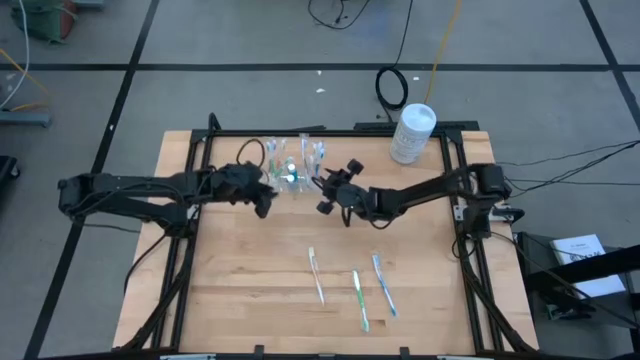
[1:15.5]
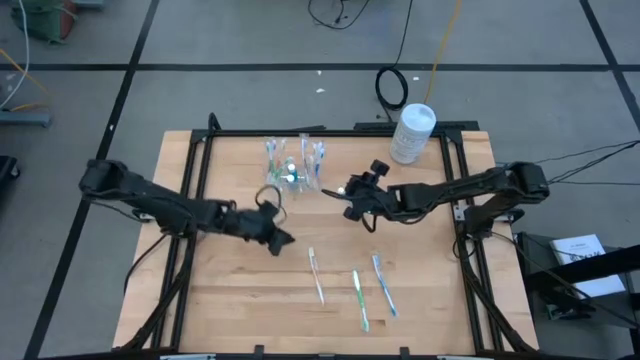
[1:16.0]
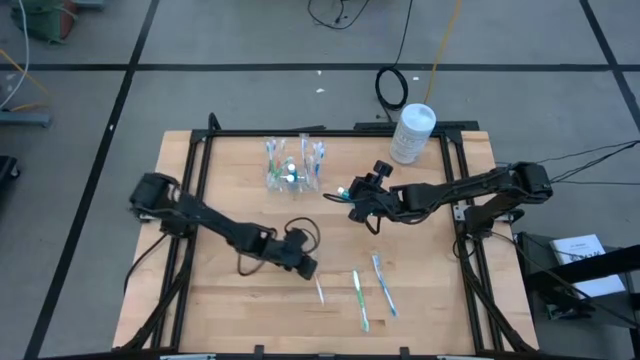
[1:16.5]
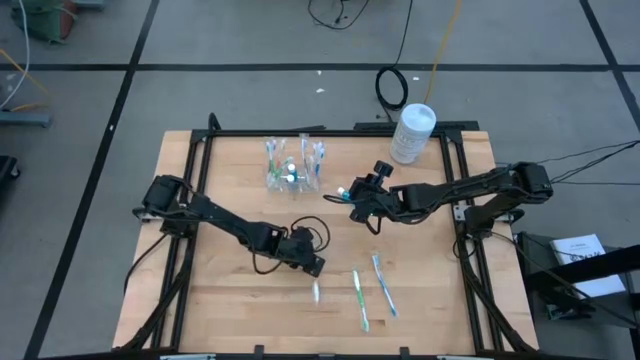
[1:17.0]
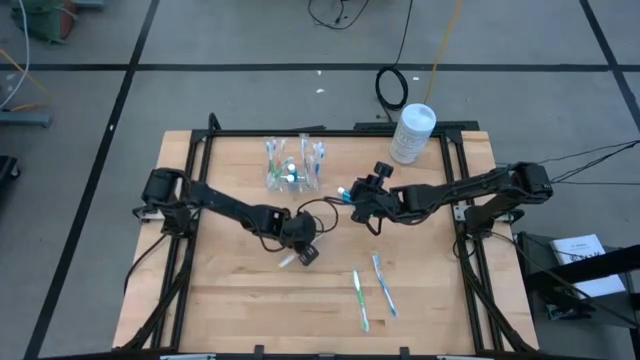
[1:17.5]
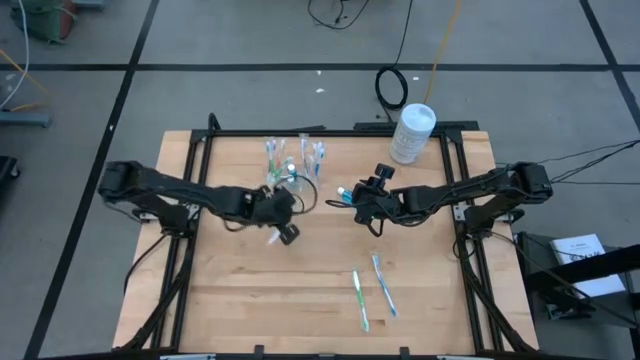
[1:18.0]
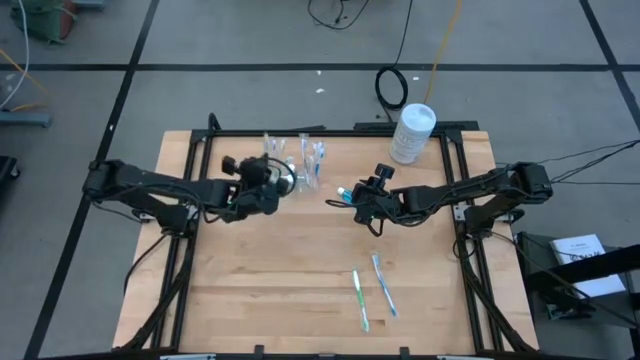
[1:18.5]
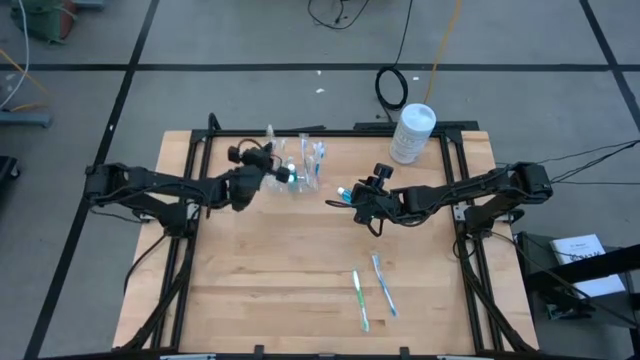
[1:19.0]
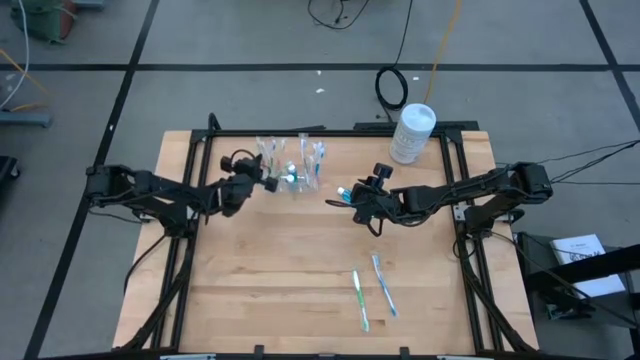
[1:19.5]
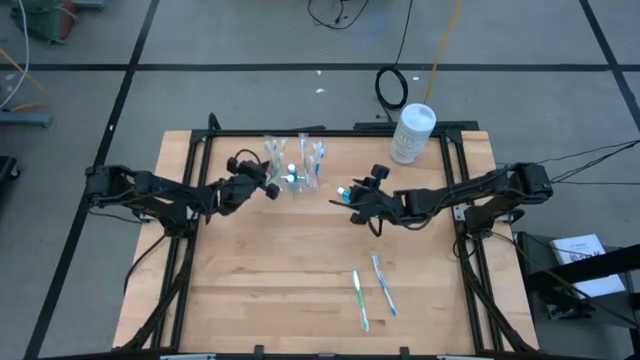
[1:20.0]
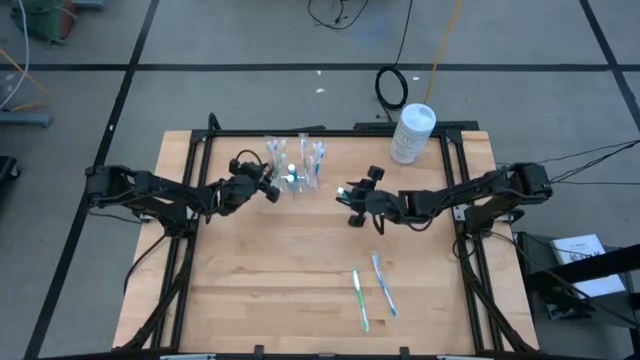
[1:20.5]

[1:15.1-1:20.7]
Task: Pick & Place toothbrushing station
Put the orange toothbrush into the transparent organizer

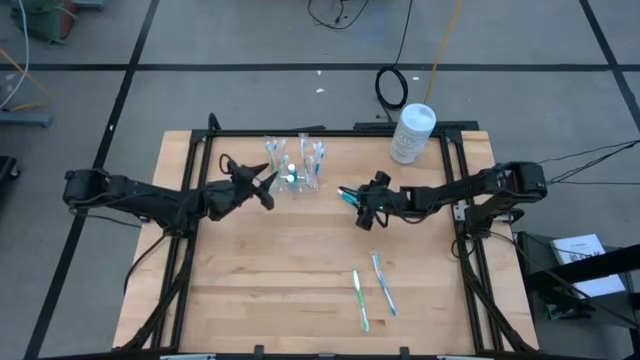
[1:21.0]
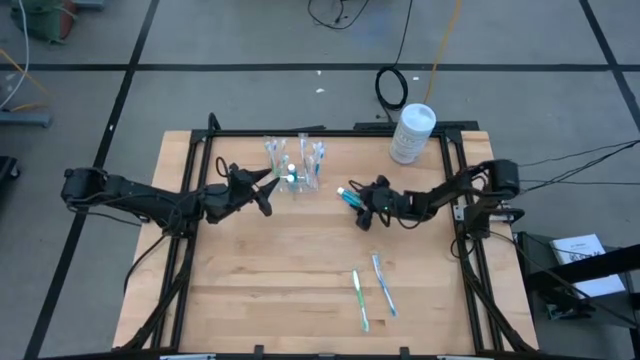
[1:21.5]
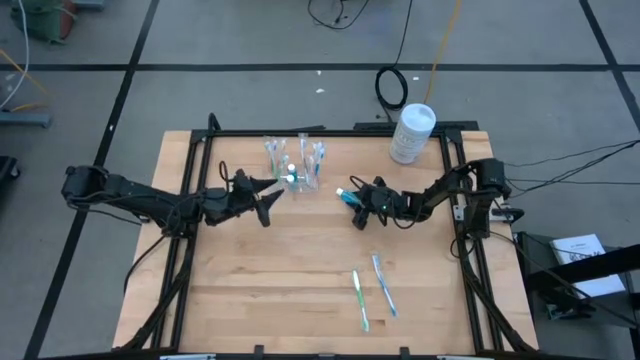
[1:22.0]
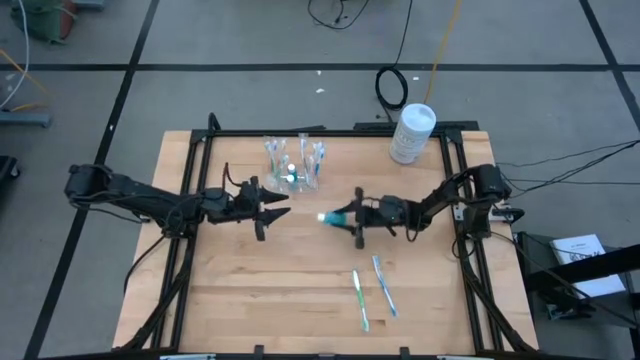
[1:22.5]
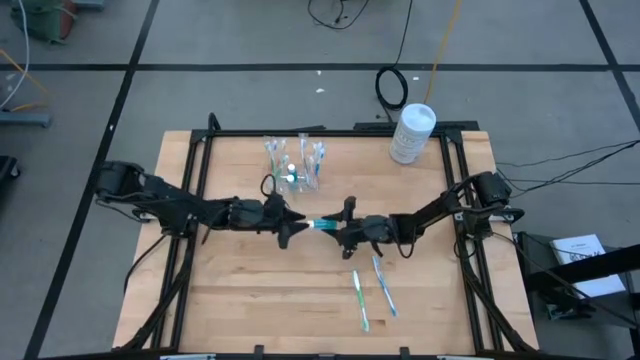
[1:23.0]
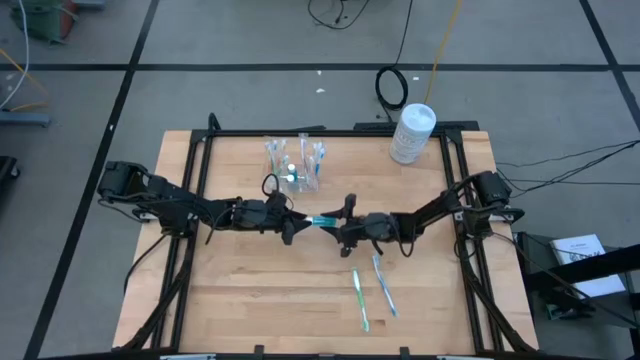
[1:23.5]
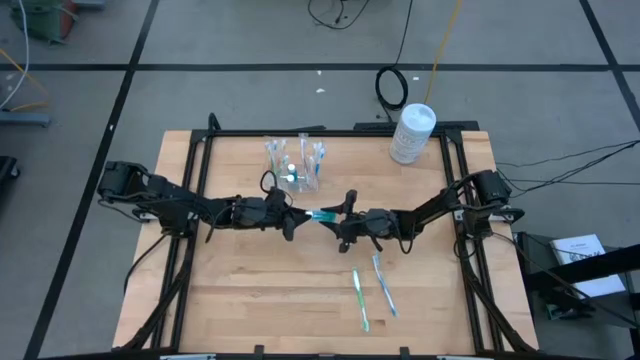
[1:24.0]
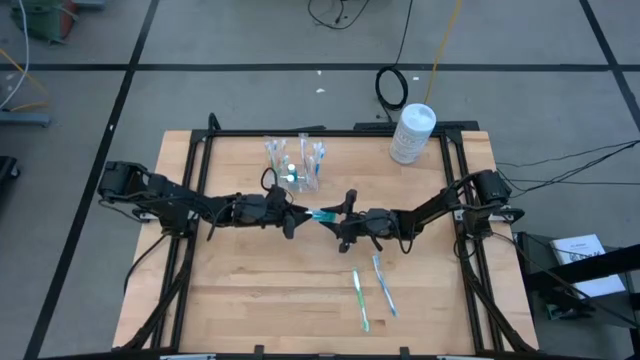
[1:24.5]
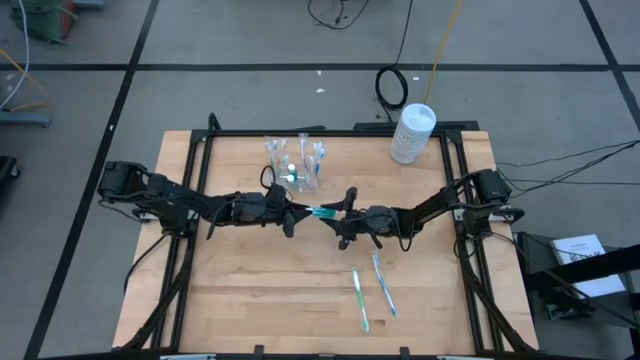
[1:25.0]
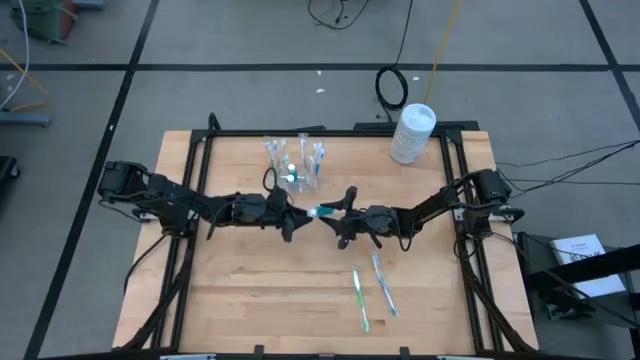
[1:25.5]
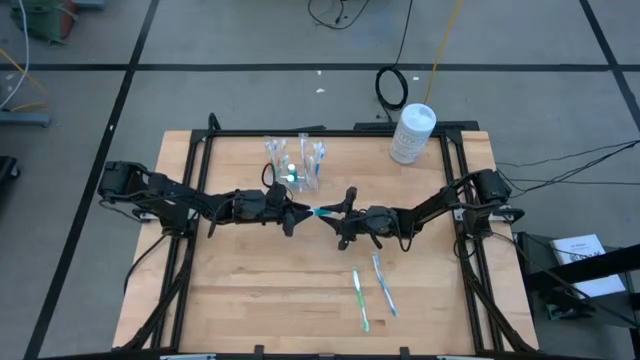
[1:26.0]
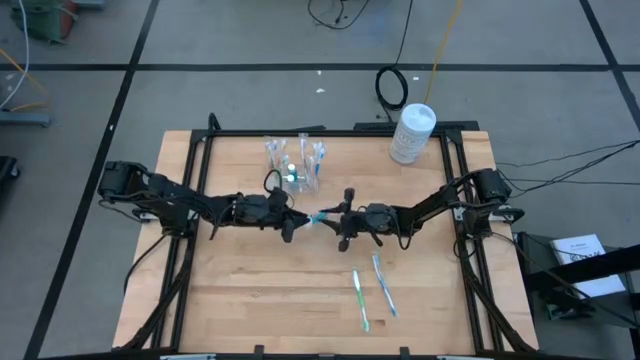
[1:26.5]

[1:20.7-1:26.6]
Put the blue mouthwash into the transparent organizer

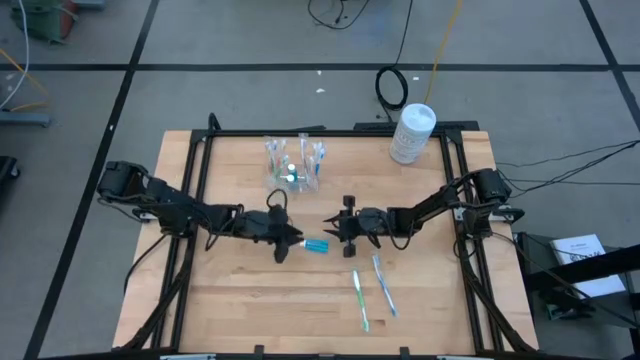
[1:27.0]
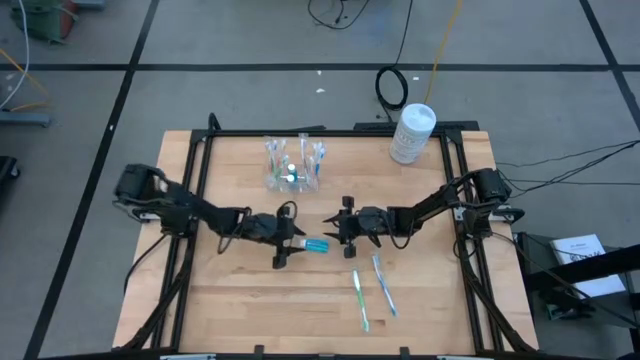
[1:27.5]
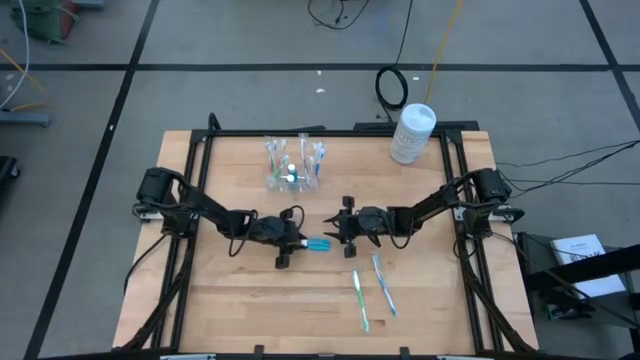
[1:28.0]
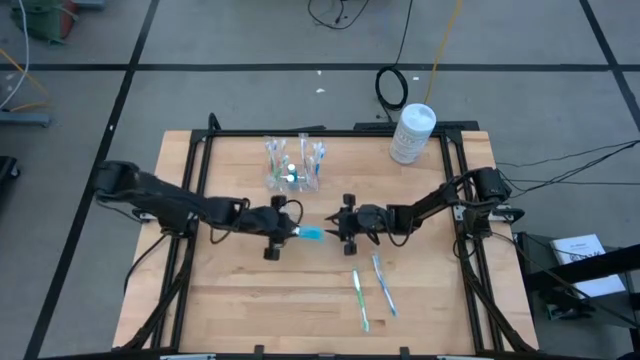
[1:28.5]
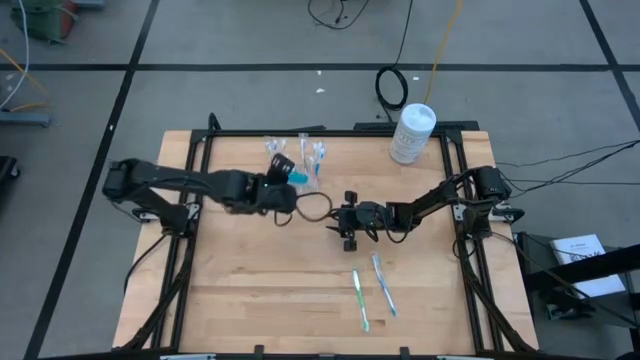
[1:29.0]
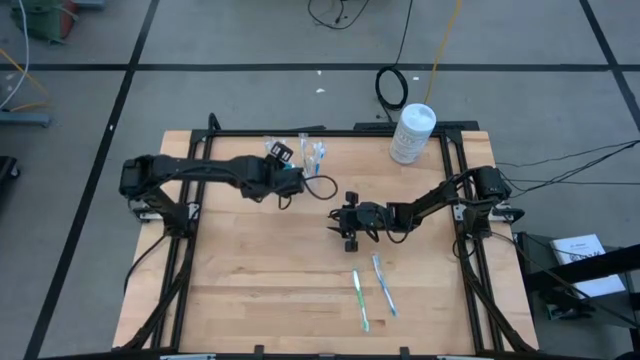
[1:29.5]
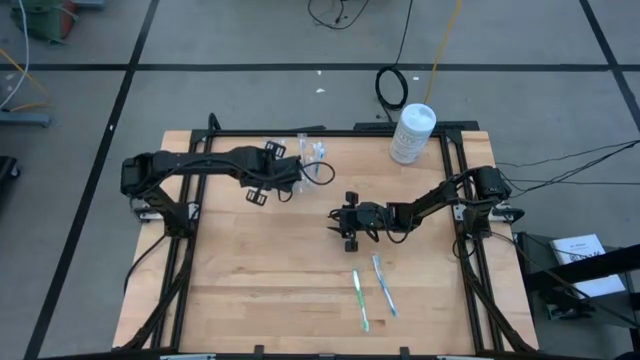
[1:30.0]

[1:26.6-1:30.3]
Put the blue mouthwash into the transparent organizer

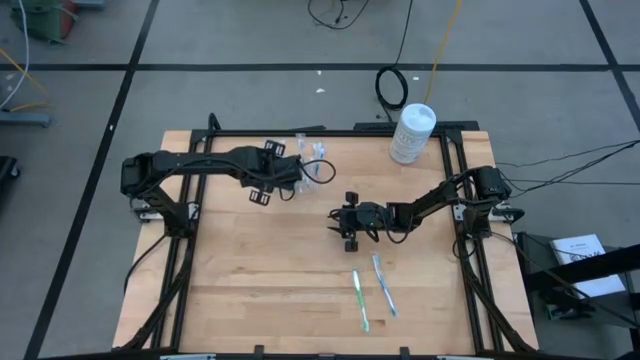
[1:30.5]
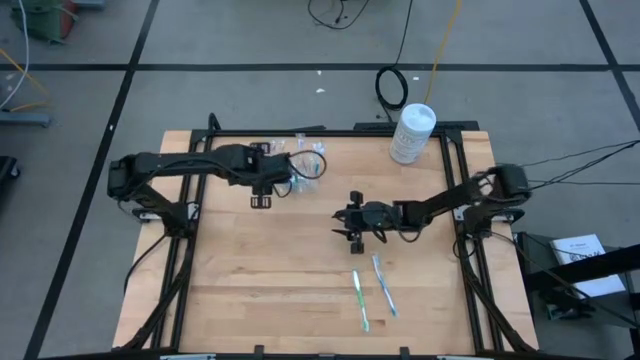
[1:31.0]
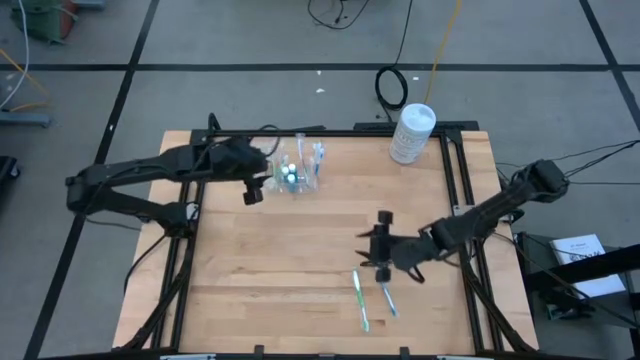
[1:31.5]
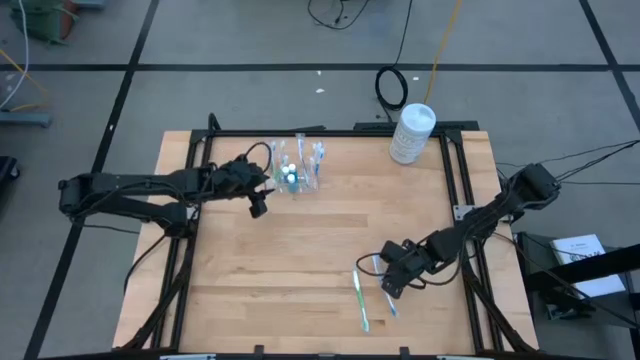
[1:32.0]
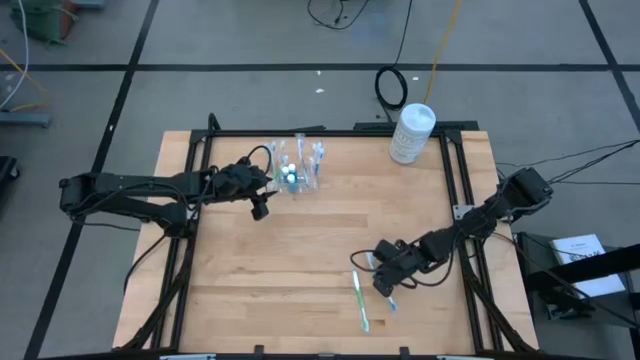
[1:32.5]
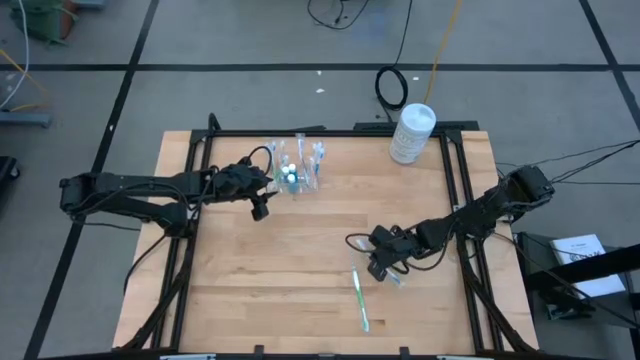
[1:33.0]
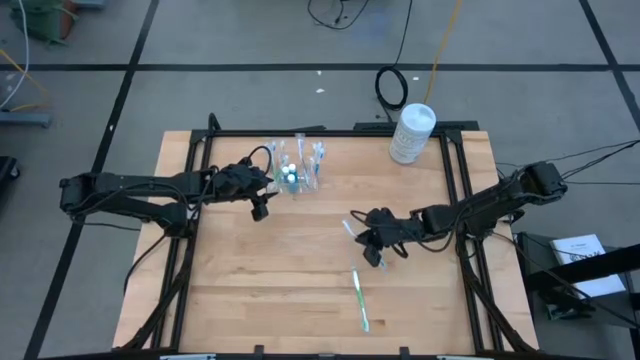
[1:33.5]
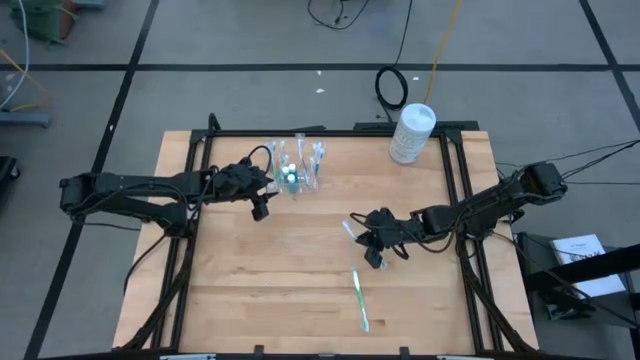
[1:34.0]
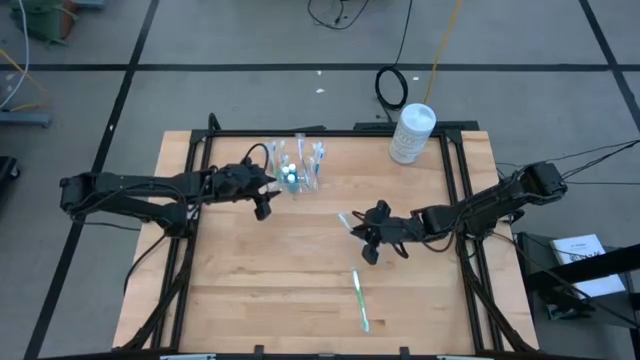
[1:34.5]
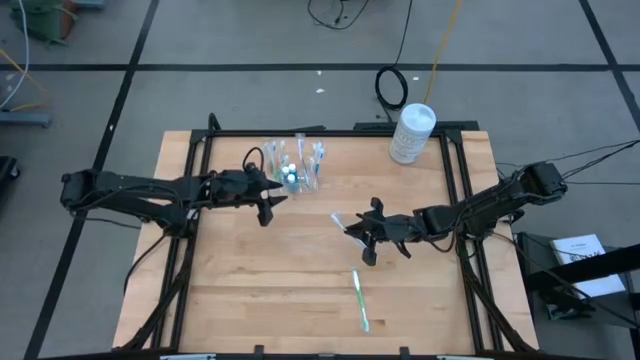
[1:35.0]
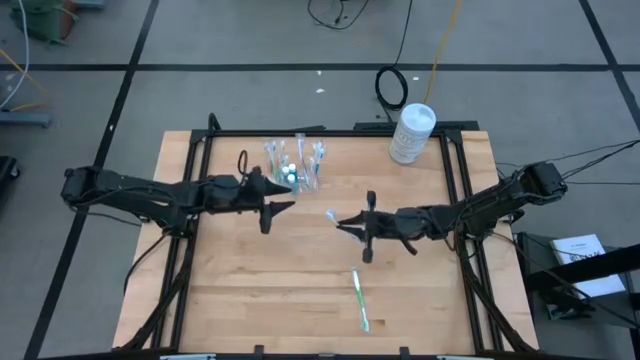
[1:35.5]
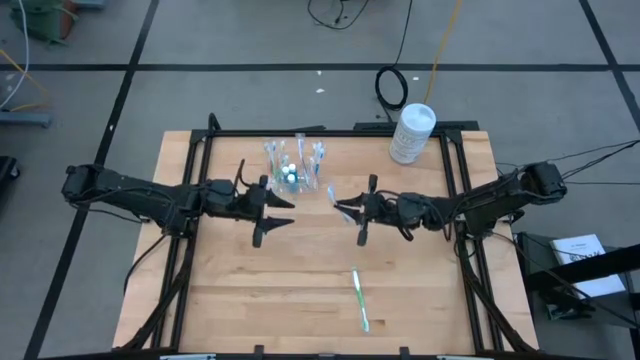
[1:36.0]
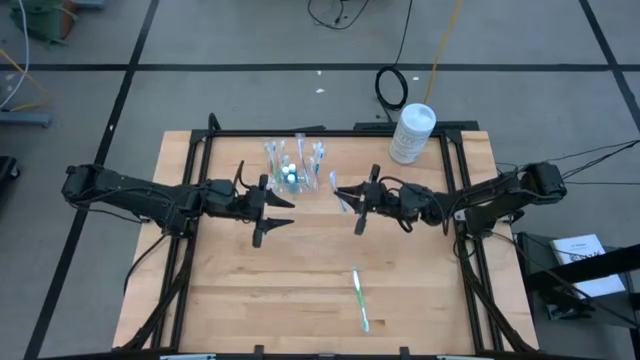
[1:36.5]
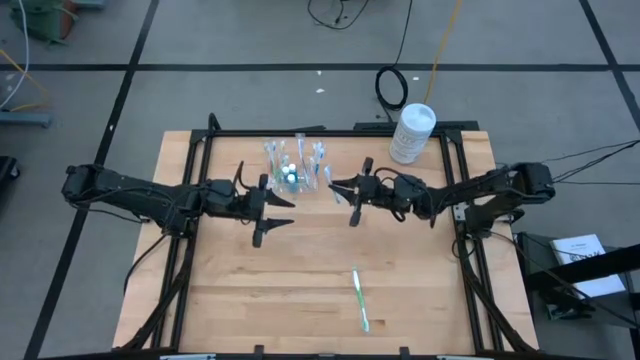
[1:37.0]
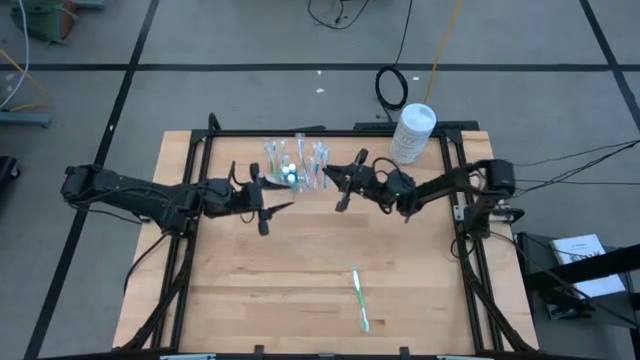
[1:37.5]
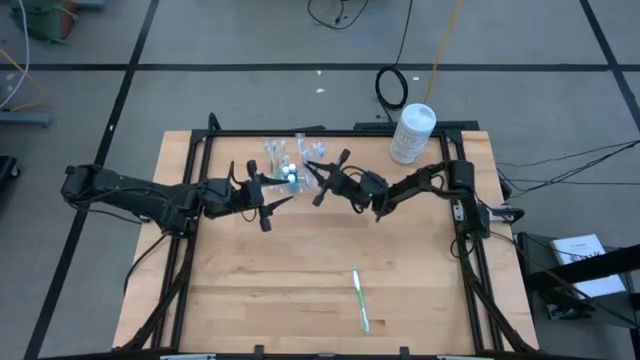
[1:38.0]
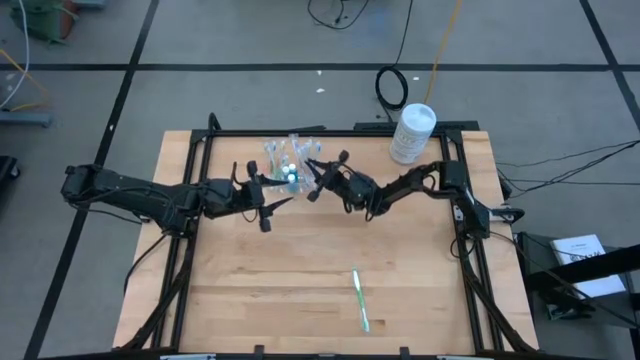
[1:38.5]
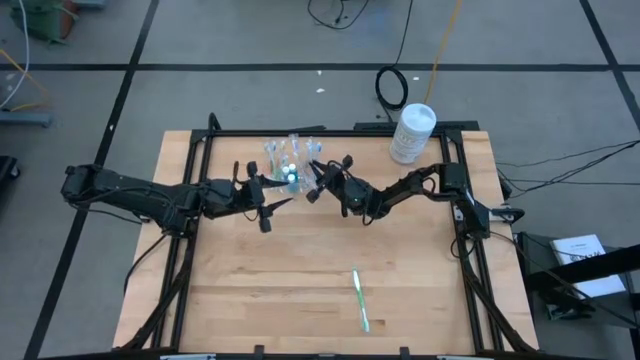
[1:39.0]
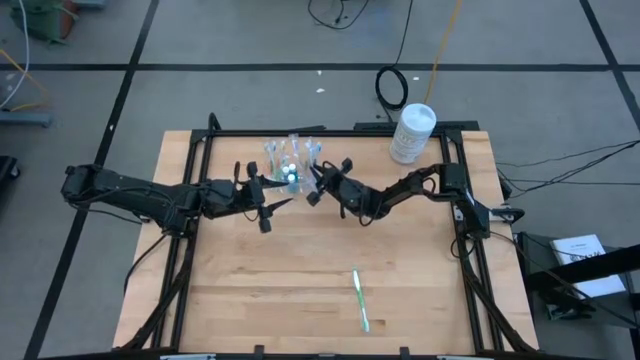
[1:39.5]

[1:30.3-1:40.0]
Put the blue toothbrush into the transparent organizer
